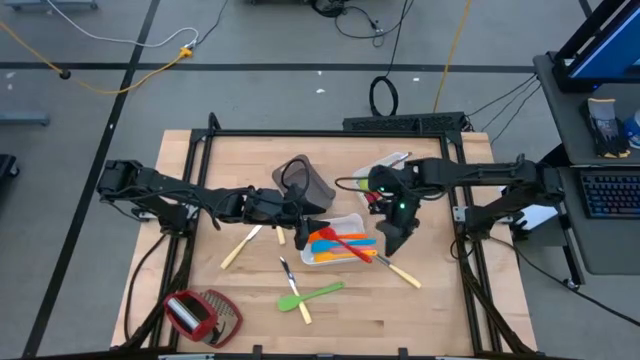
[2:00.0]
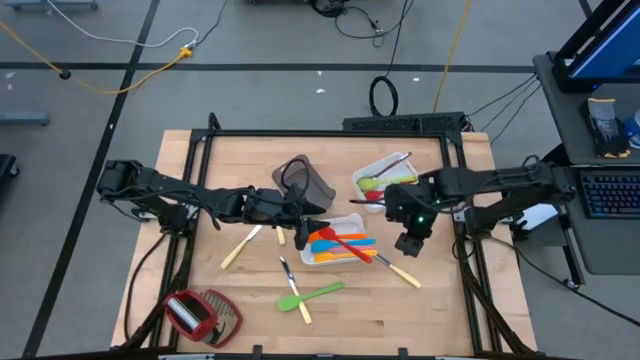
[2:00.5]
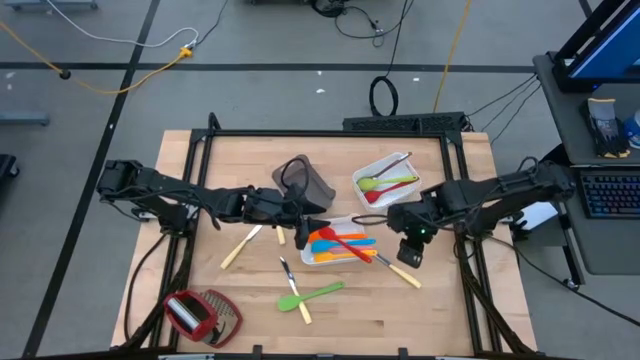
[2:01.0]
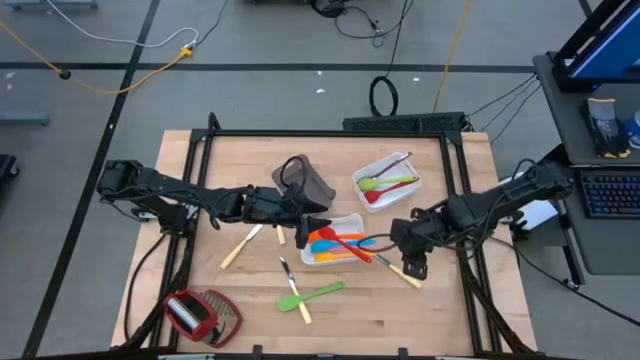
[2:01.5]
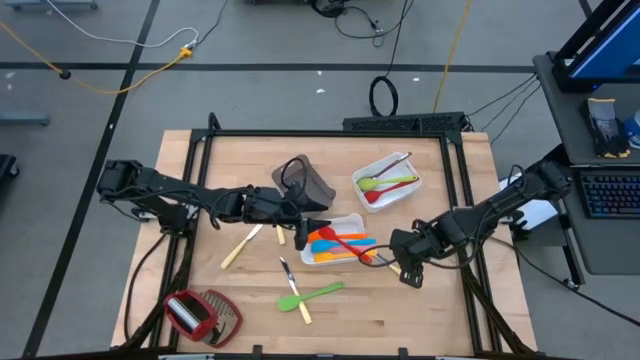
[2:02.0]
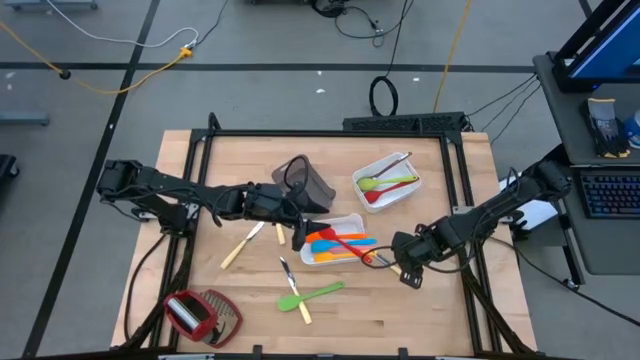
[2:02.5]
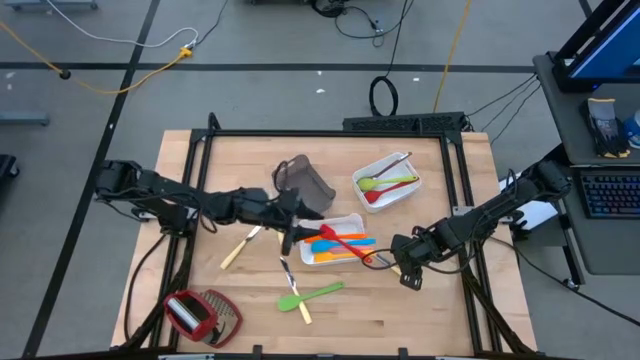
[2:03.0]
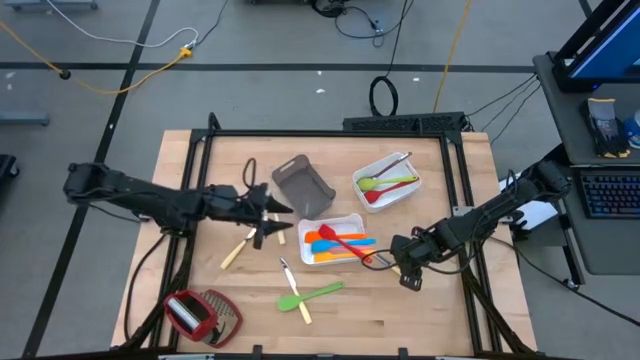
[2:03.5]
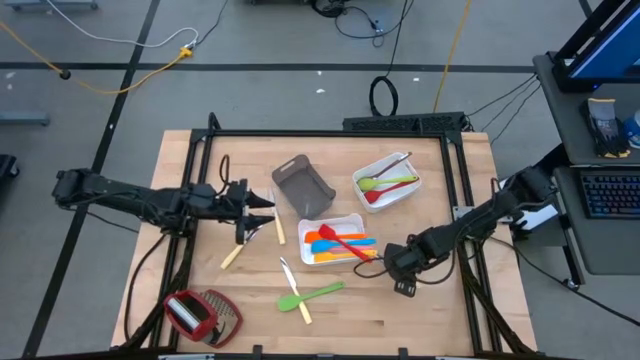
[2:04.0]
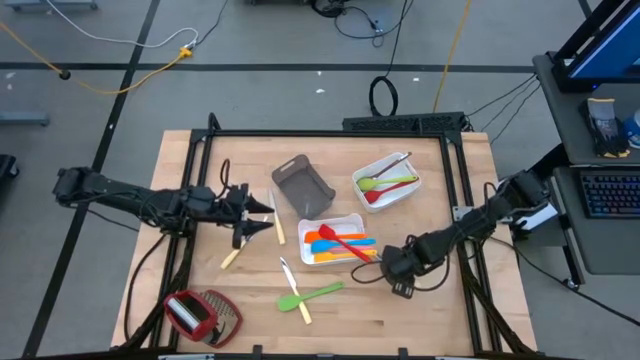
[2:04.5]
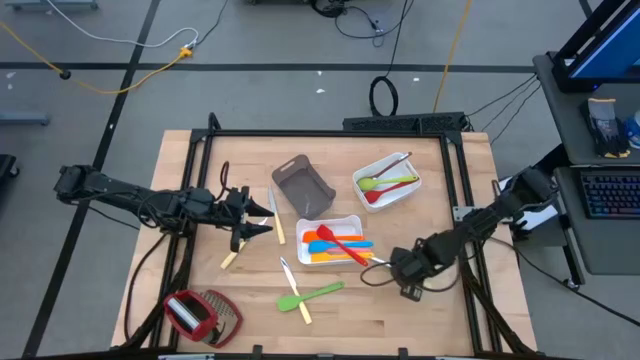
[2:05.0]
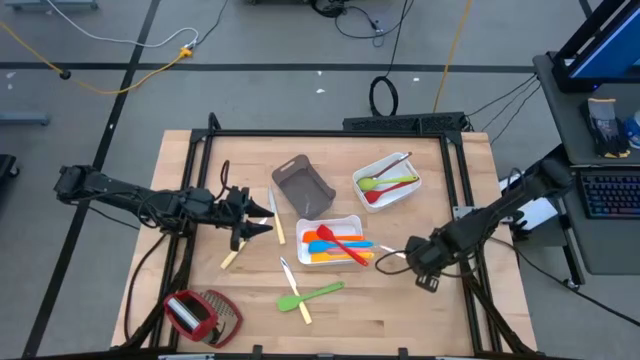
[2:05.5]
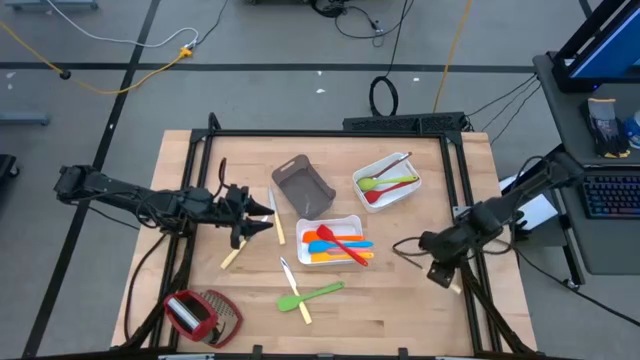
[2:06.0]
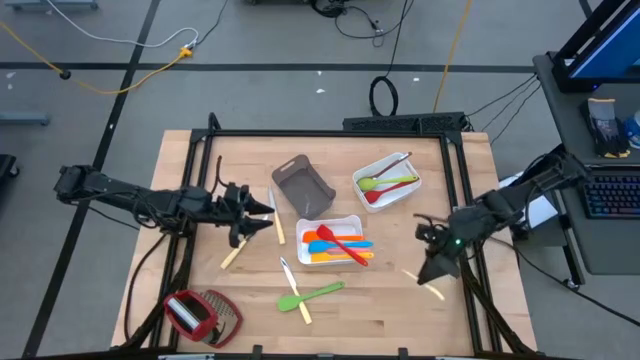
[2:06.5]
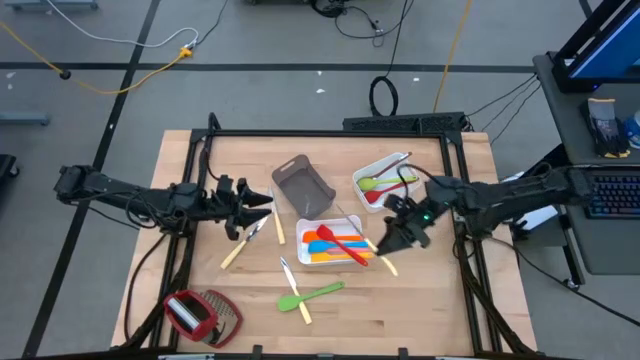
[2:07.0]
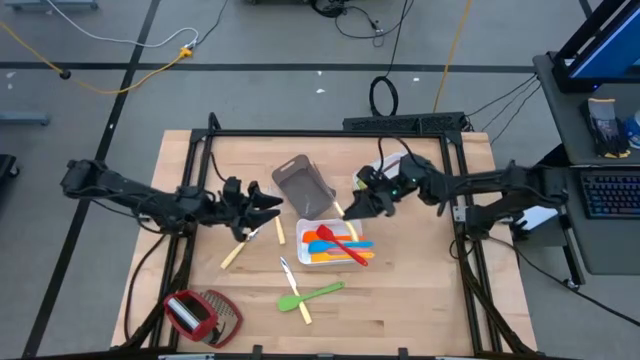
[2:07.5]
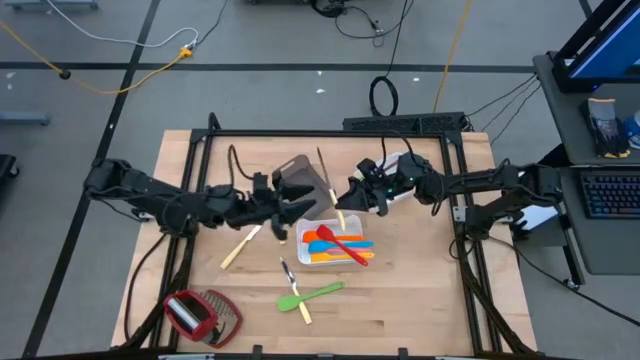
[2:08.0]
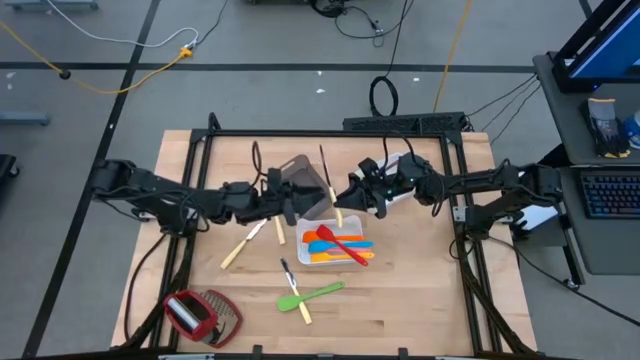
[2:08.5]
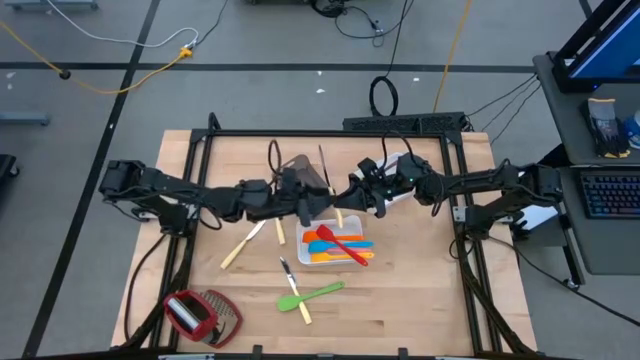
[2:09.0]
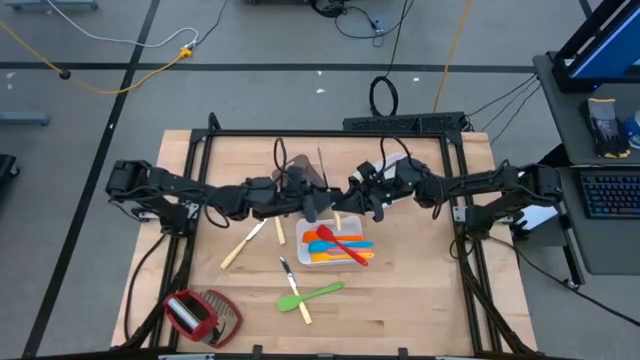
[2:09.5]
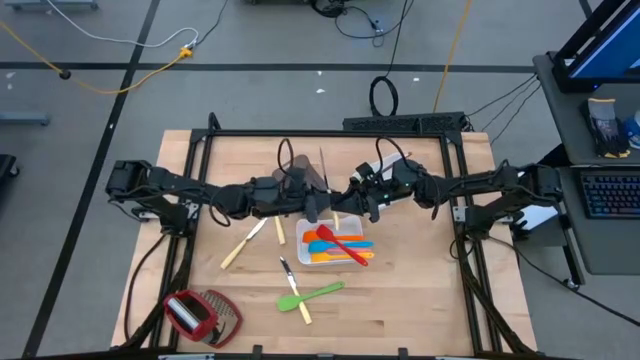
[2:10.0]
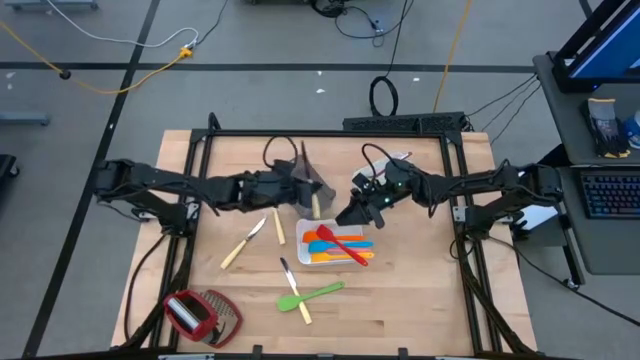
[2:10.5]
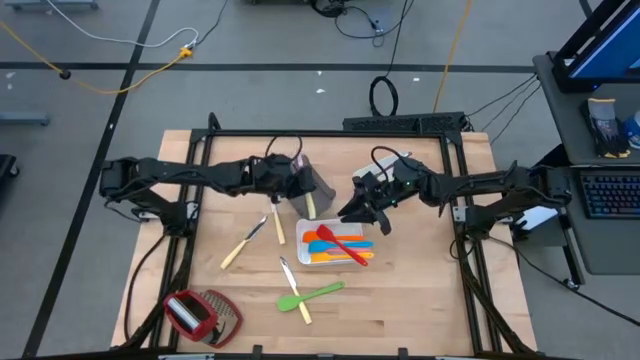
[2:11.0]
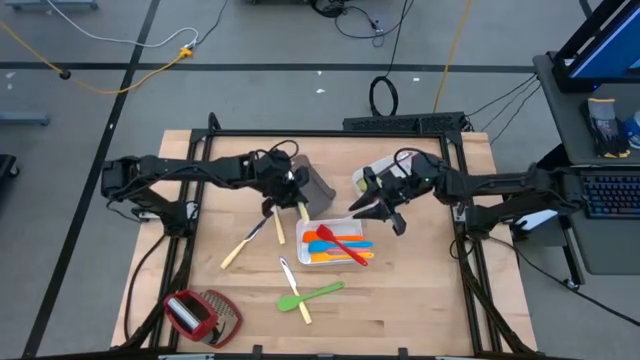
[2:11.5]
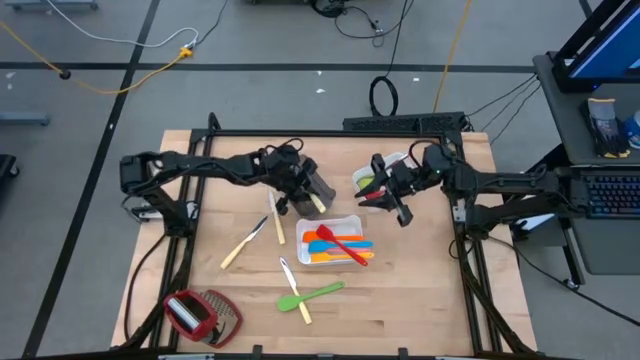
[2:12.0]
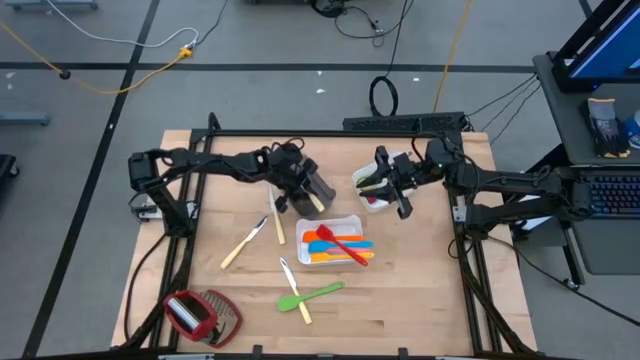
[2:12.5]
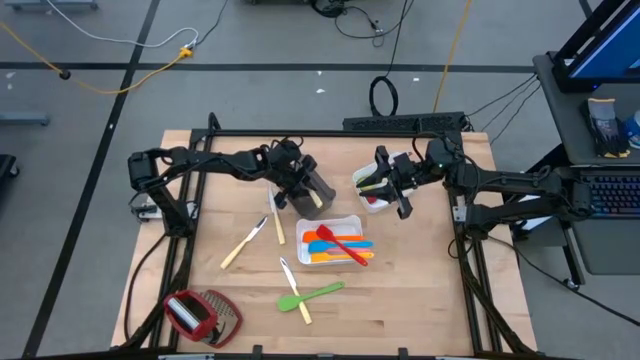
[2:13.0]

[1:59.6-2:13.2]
Task: Pick & Place Kitchen Items
Put the yellow knife into the black bin

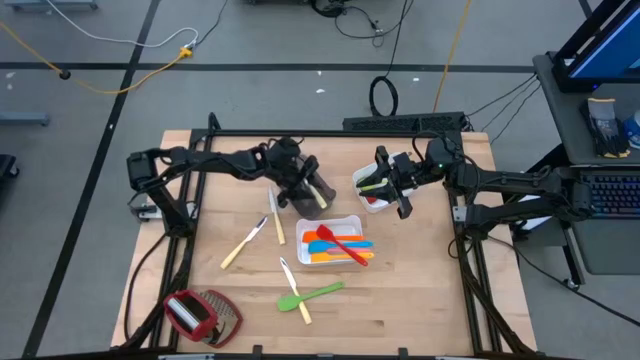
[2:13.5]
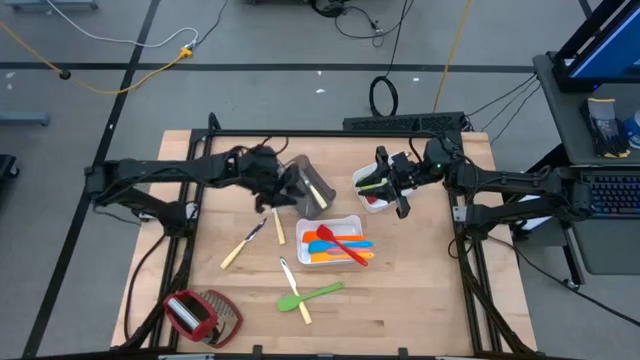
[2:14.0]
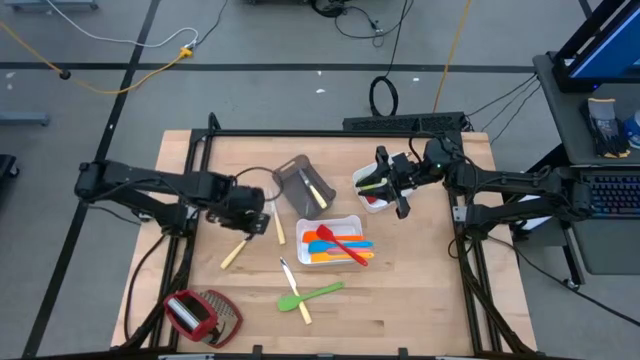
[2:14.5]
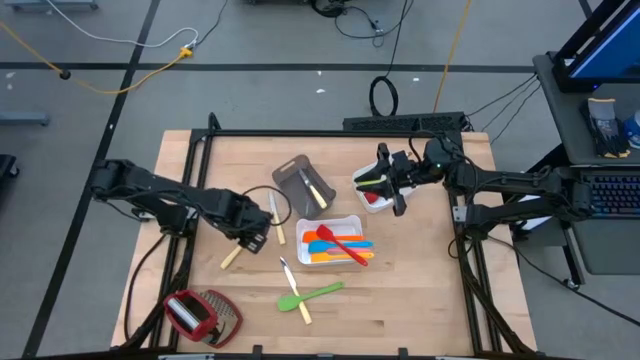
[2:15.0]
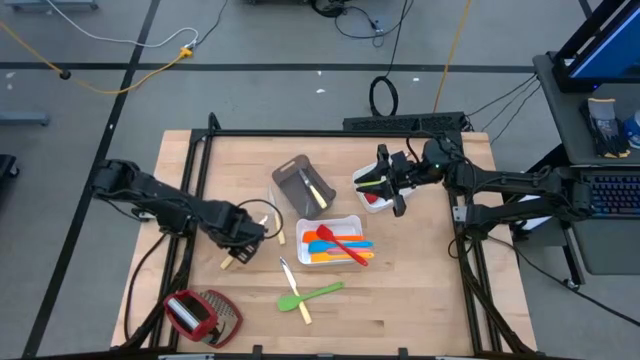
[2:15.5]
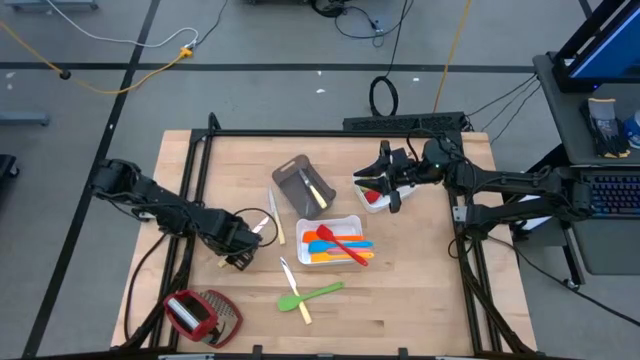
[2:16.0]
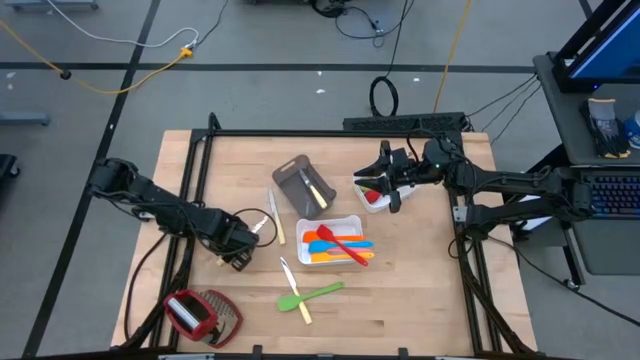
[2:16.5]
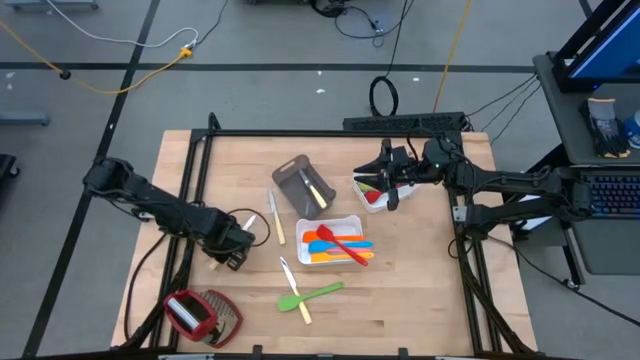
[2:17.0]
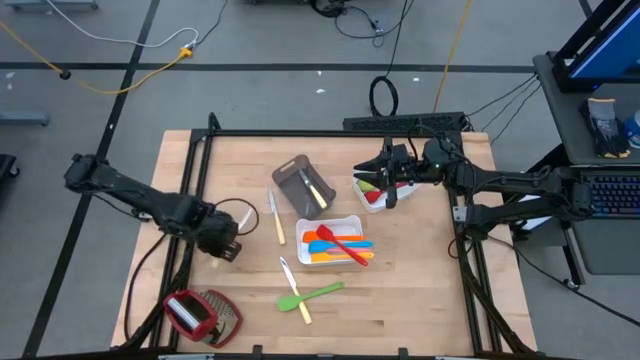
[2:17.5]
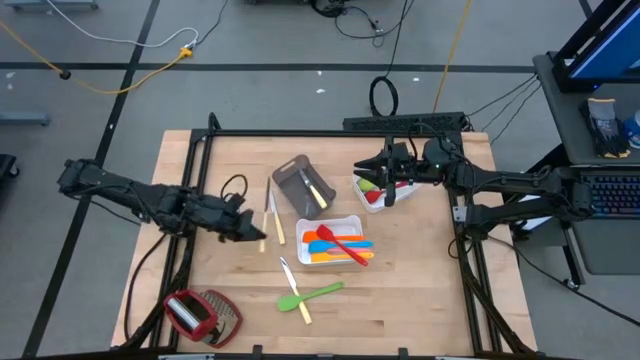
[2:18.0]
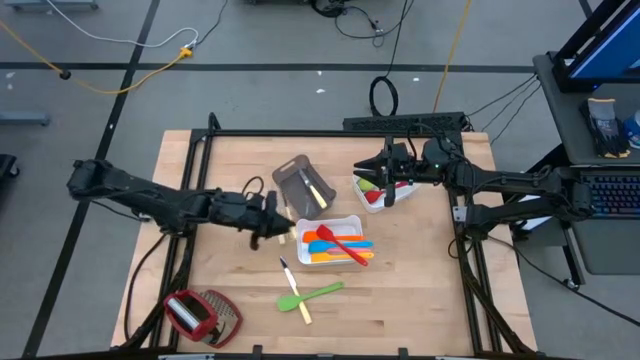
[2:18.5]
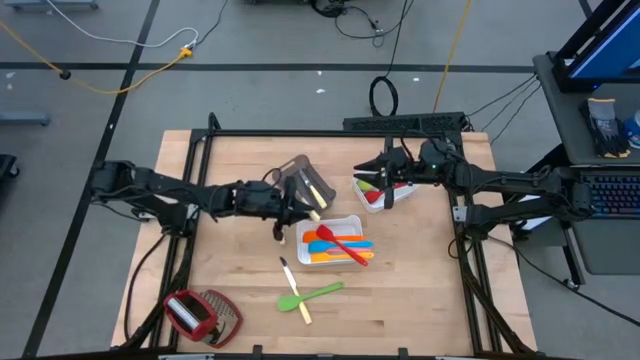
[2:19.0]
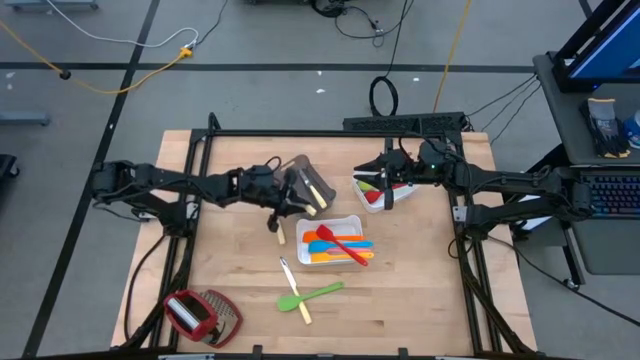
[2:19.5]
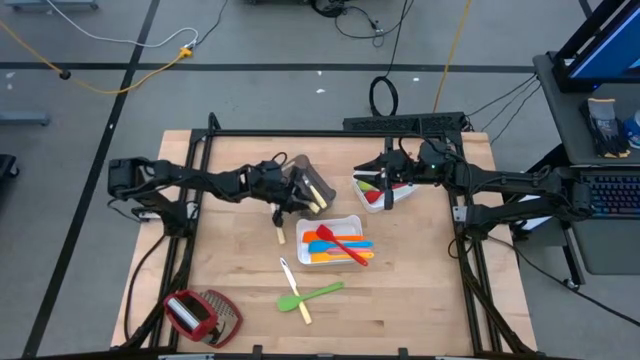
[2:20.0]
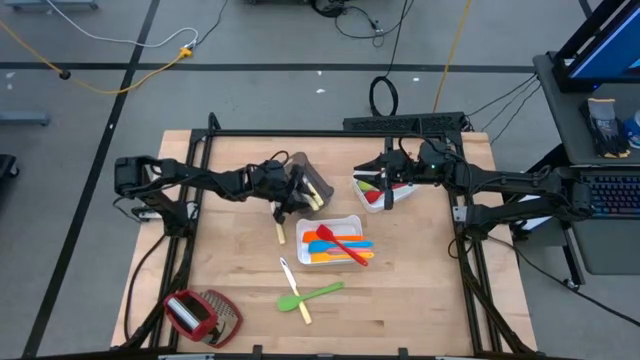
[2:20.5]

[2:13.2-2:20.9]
Put the yellow knife into the black bin
